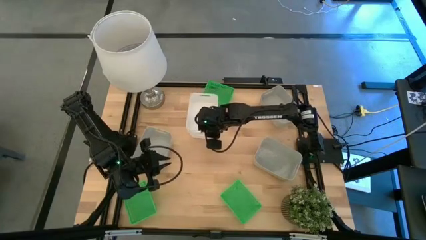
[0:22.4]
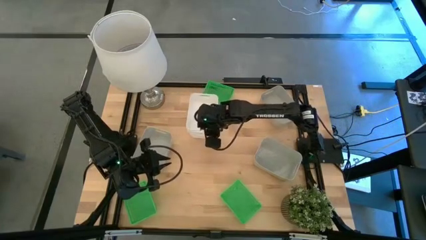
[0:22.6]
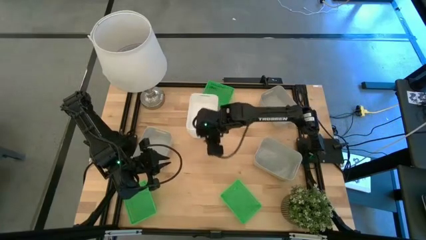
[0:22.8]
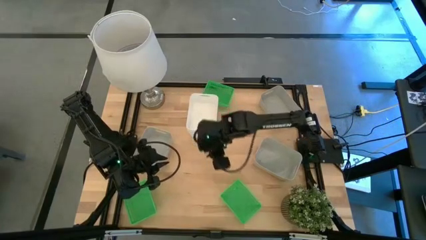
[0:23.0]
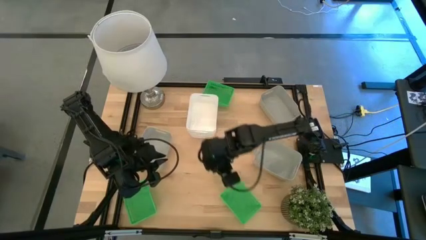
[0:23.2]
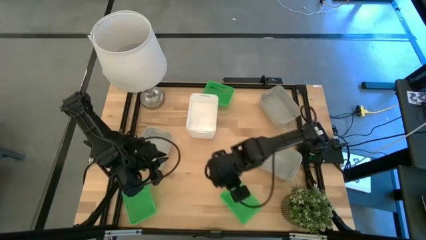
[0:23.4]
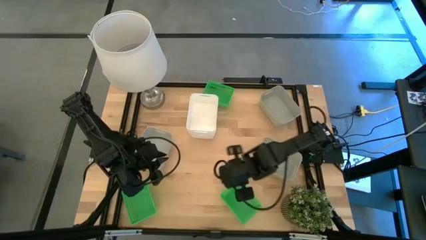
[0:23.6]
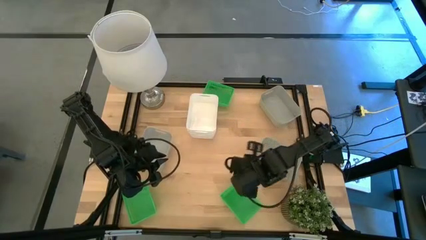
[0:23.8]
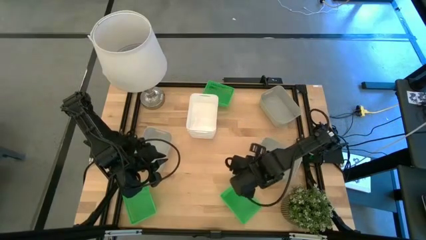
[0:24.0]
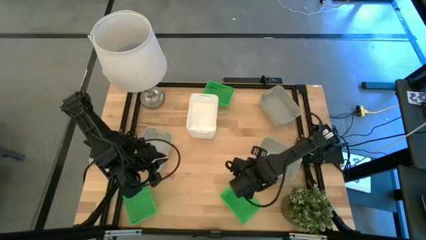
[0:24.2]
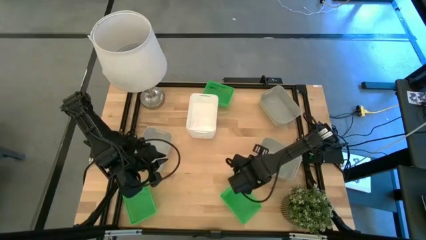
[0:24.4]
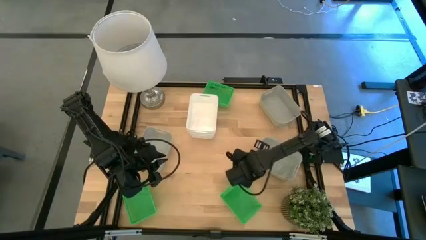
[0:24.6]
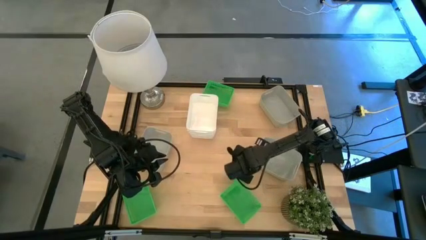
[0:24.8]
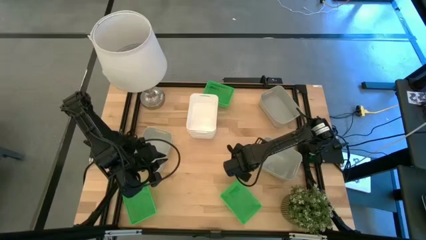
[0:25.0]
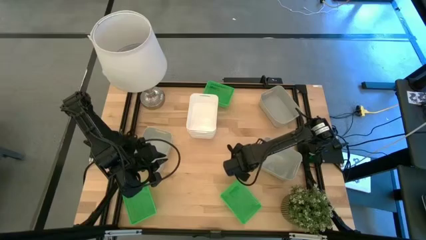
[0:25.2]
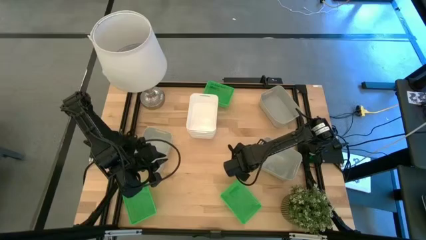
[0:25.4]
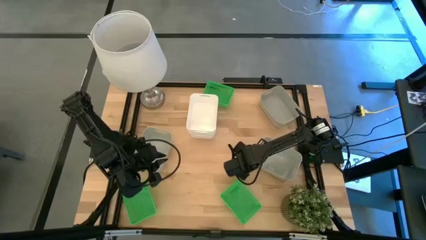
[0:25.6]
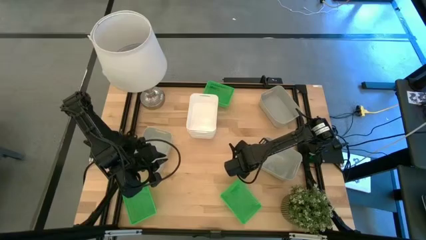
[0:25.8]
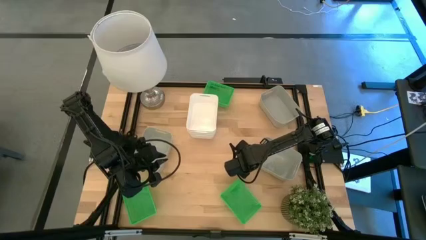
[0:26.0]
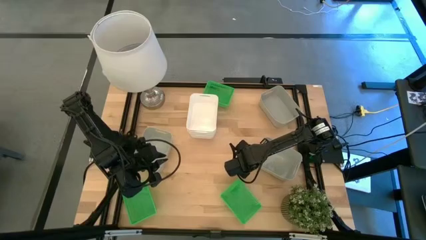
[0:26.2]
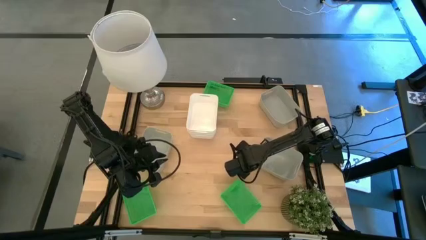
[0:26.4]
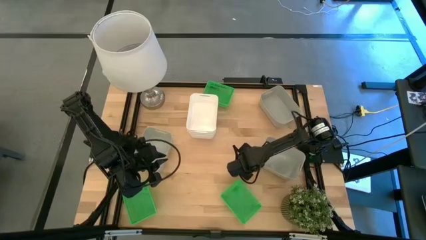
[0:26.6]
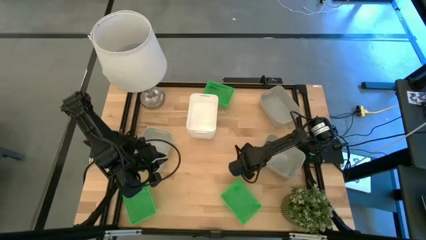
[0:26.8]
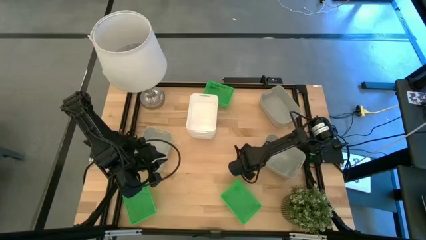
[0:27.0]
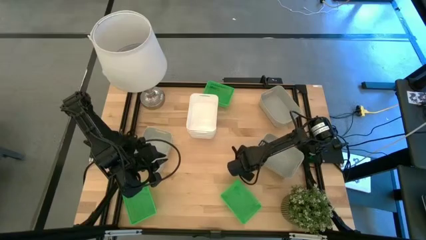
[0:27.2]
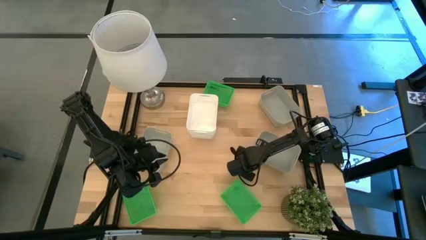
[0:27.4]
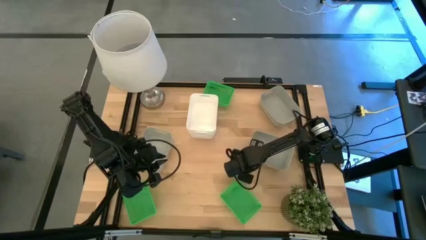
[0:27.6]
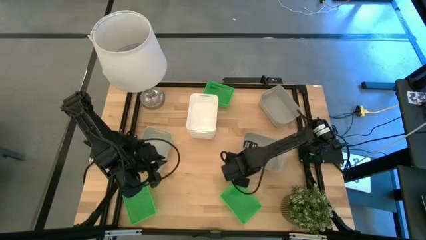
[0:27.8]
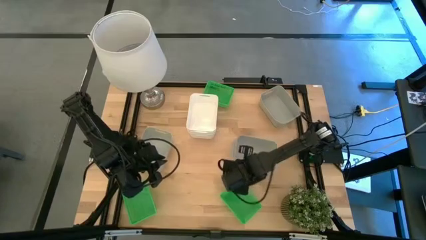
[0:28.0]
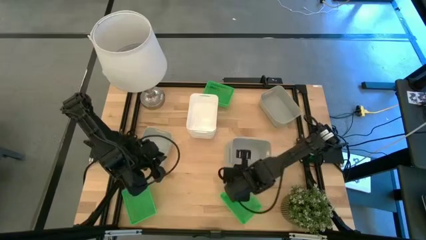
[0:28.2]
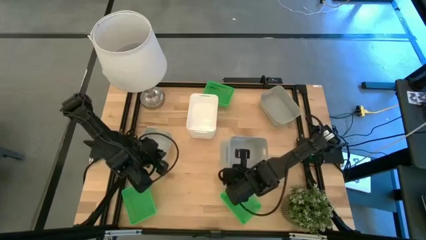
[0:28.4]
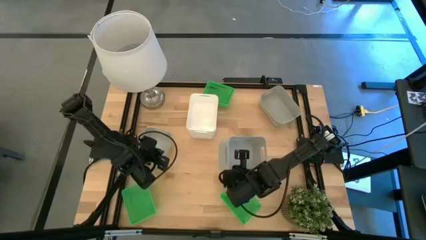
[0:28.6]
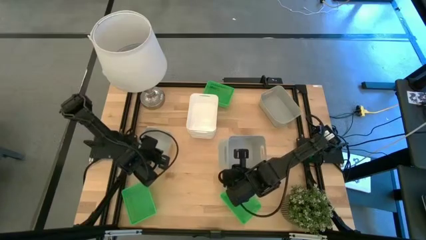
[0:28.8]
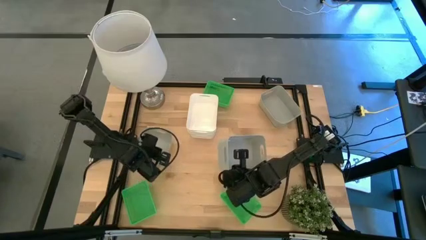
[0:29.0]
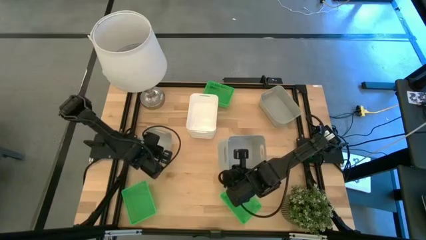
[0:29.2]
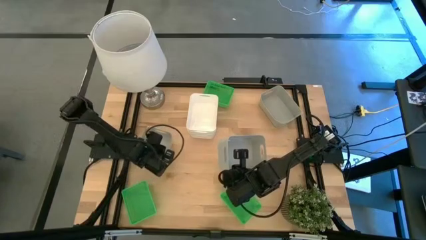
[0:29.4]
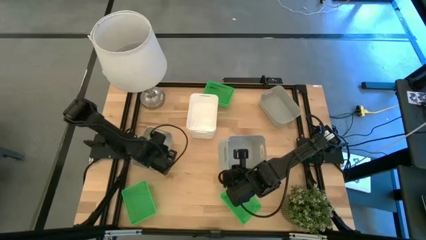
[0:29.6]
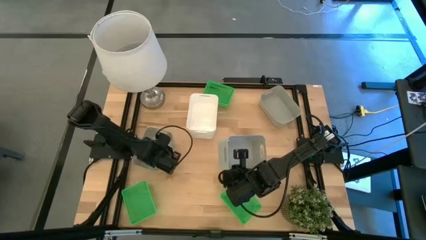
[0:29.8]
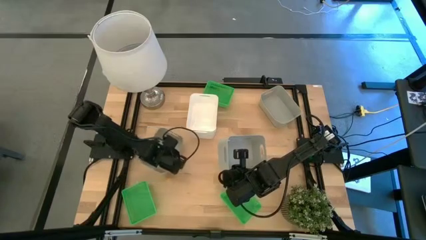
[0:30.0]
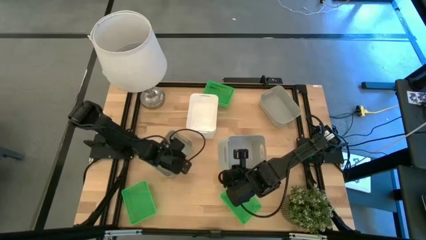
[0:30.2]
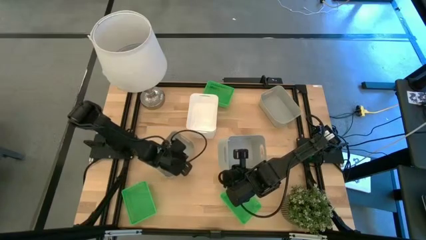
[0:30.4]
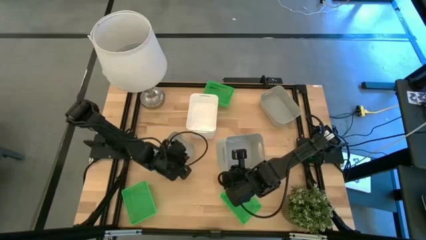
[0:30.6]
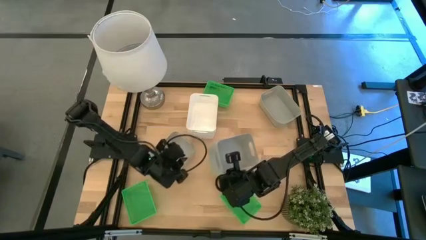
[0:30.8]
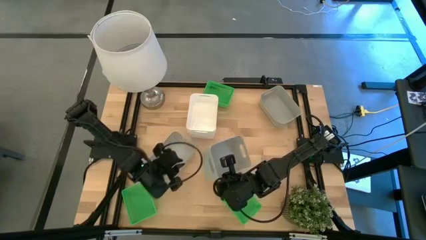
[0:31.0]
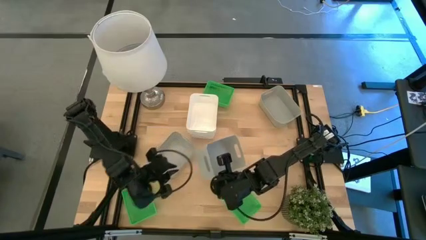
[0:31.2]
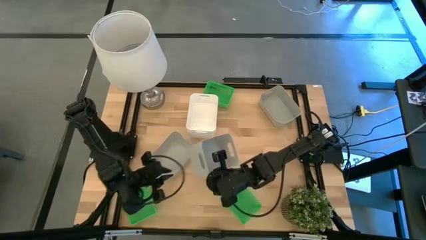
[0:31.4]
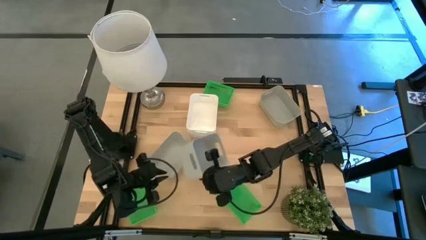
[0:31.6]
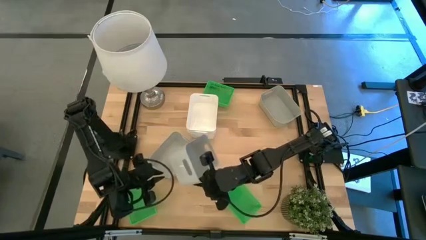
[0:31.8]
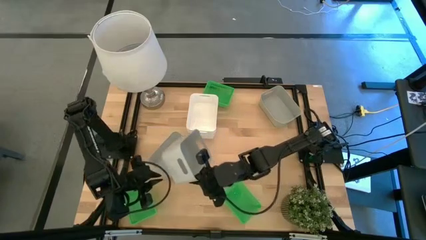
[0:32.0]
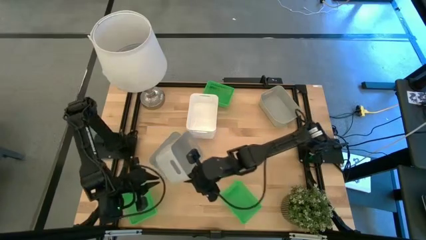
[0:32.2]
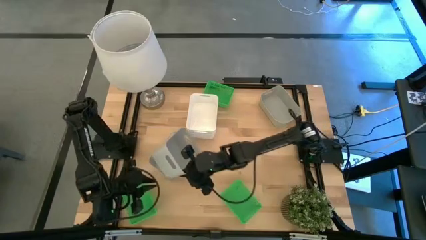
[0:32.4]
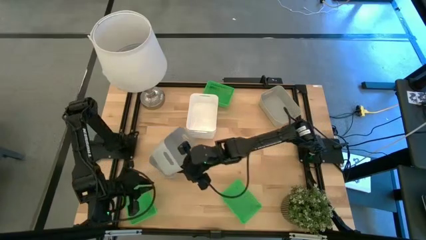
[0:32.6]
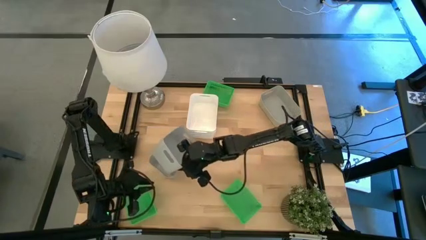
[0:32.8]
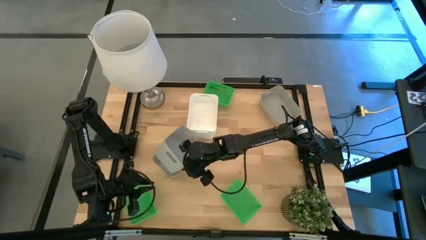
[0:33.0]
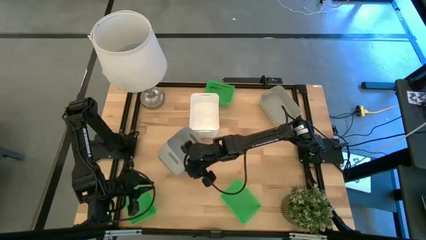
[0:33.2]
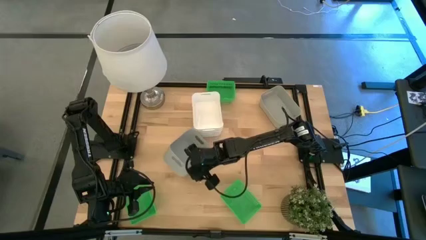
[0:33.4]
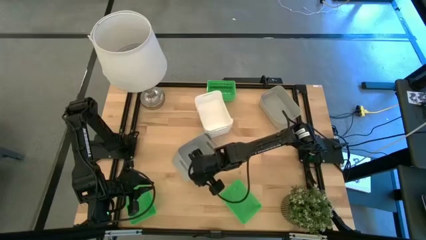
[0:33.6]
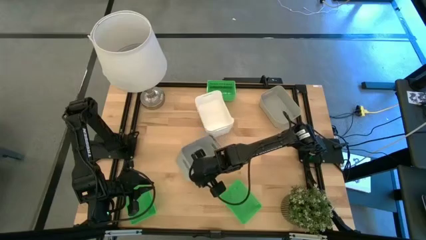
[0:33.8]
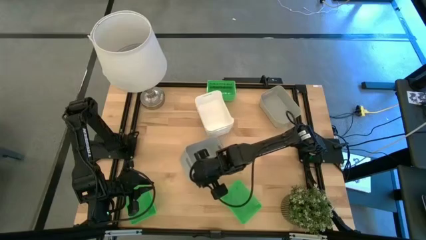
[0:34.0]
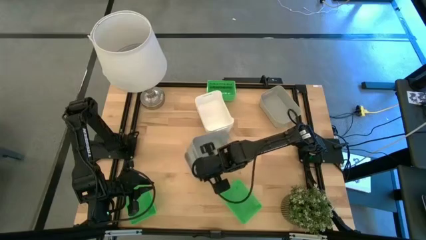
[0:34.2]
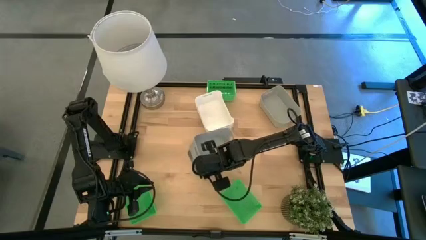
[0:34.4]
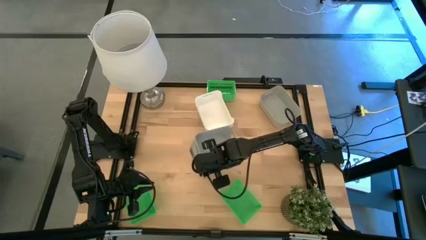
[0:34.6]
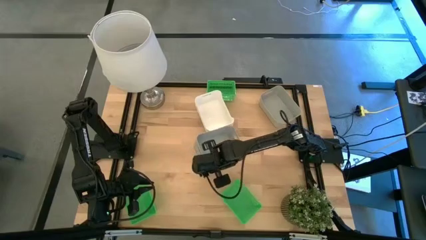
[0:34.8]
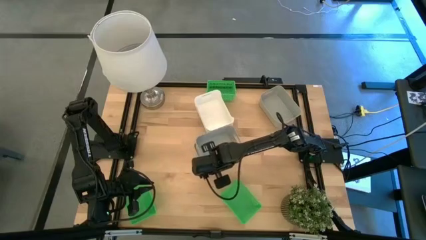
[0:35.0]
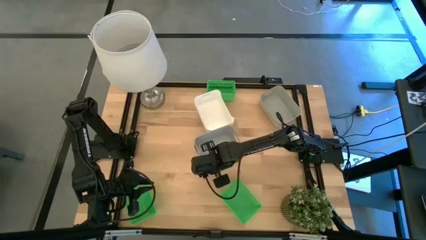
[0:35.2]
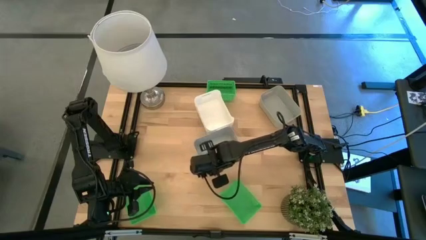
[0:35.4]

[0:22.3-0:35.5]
Stack the bottom right gray bin on the bottom left gray bin

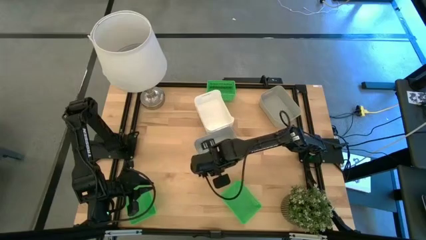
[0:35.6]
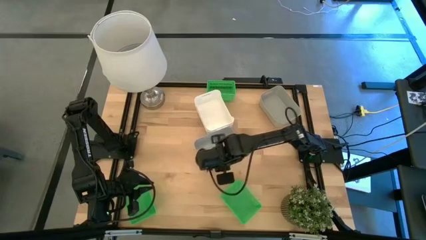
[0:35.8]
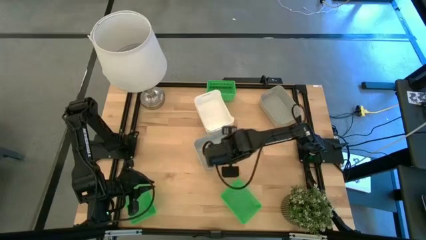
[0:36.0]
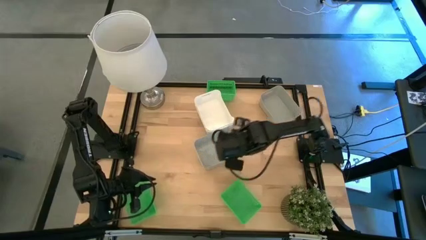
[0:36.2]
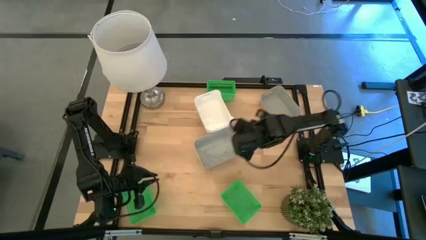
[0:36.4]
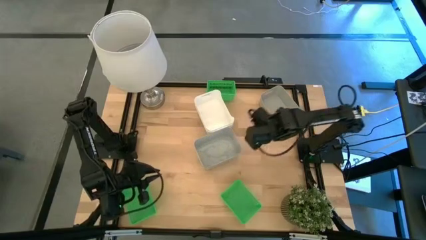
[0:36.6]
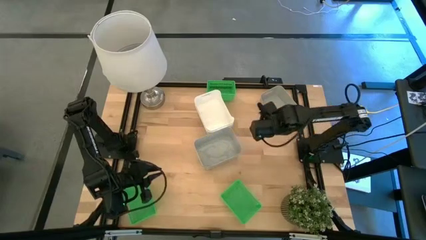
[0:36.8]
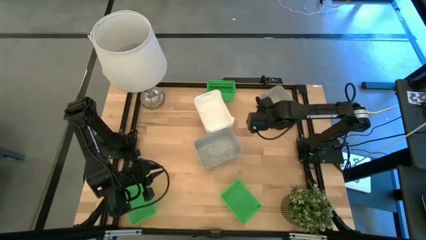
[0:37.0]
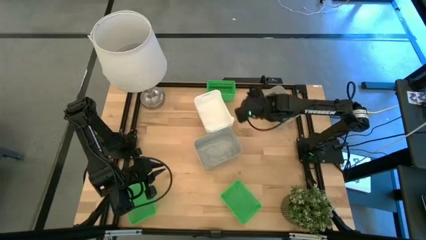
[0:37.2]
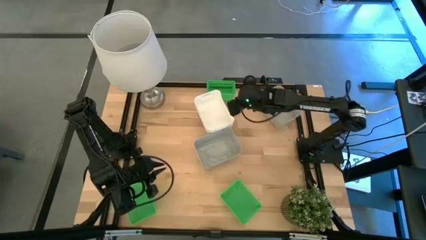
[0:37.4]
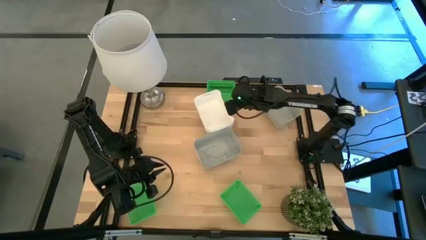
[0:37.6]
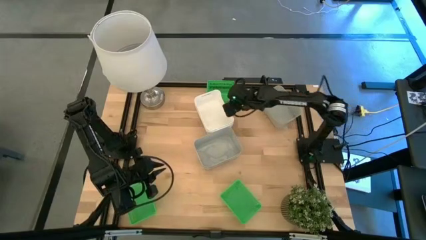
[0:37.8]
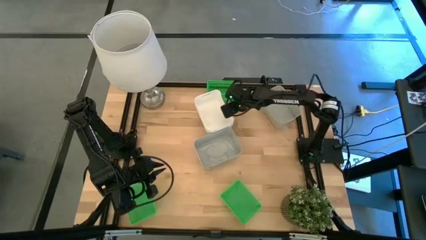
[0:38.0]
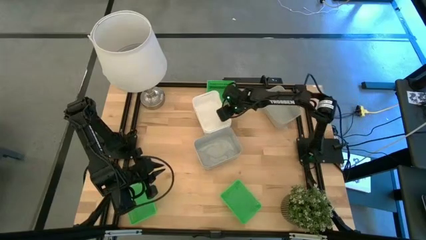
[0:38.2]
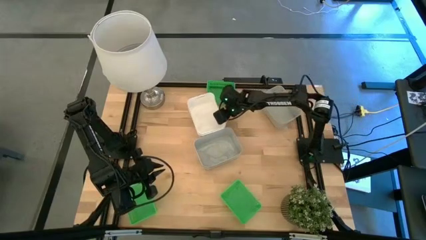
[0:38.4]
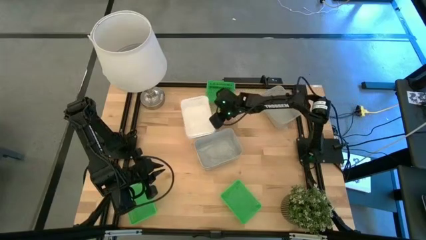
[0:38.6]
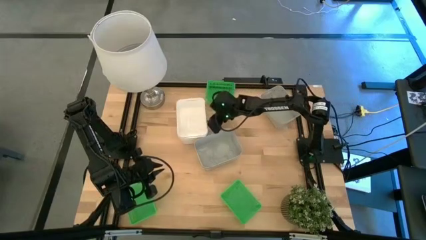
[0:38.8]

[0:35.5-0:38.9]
Adjust the stacked white bin
